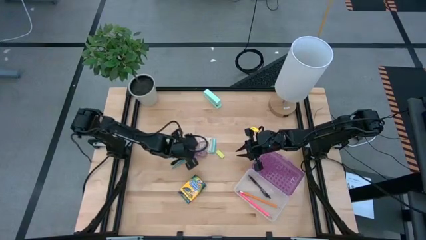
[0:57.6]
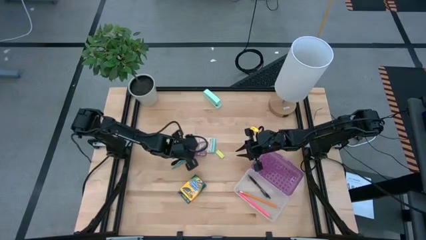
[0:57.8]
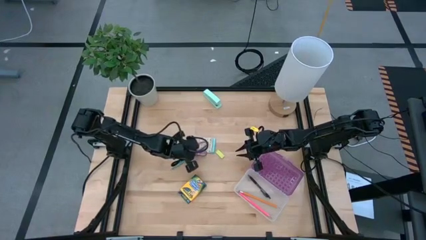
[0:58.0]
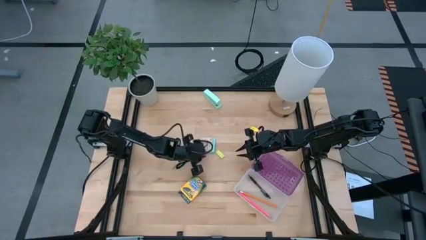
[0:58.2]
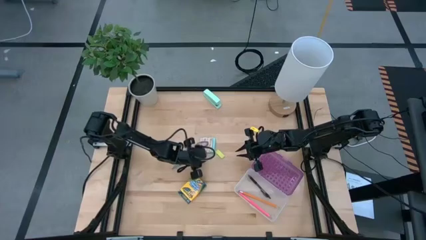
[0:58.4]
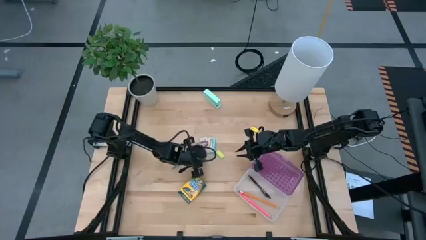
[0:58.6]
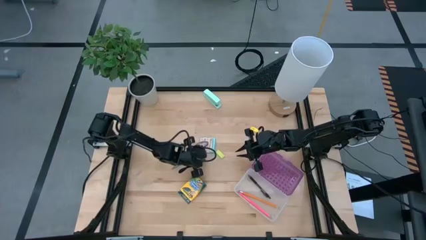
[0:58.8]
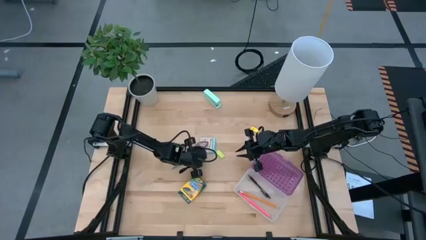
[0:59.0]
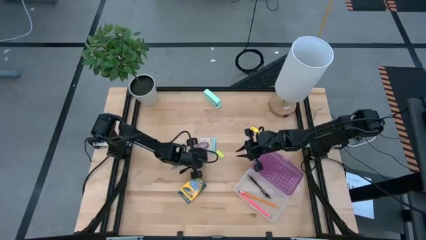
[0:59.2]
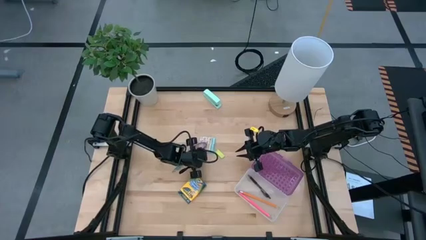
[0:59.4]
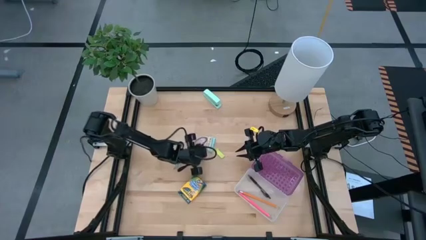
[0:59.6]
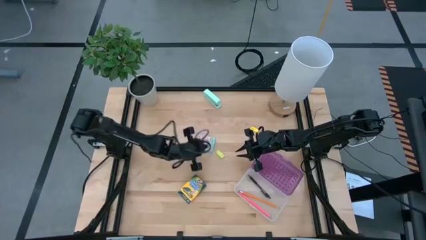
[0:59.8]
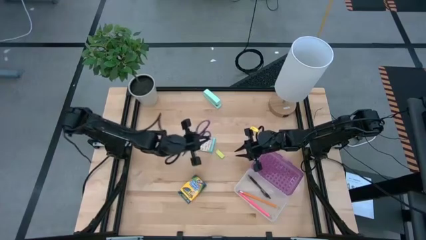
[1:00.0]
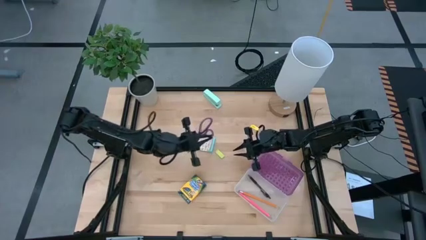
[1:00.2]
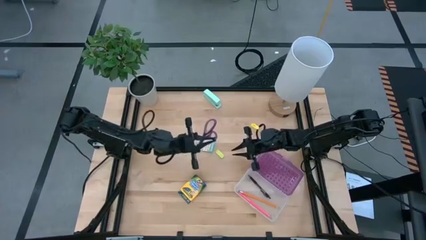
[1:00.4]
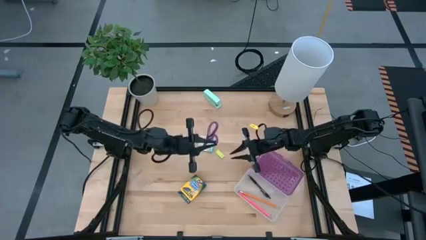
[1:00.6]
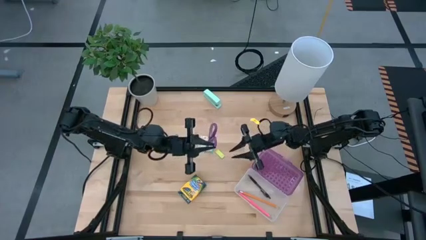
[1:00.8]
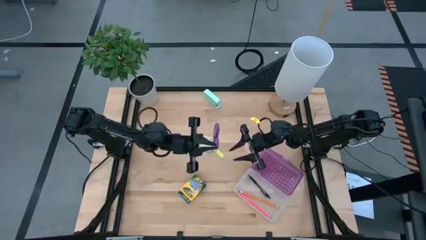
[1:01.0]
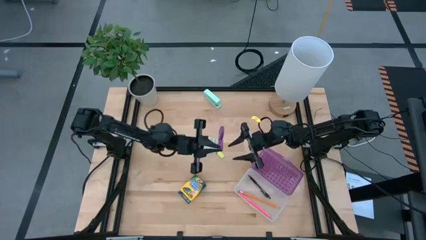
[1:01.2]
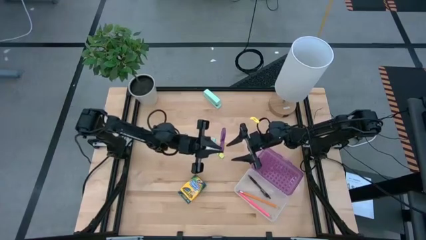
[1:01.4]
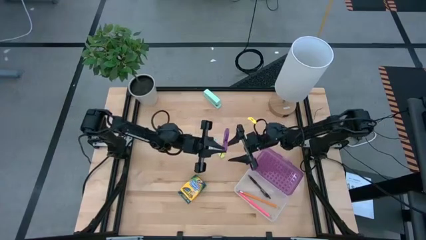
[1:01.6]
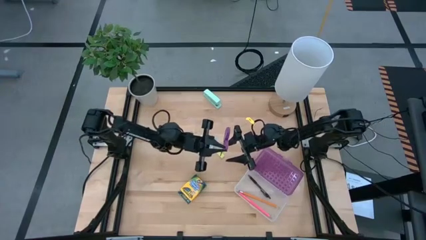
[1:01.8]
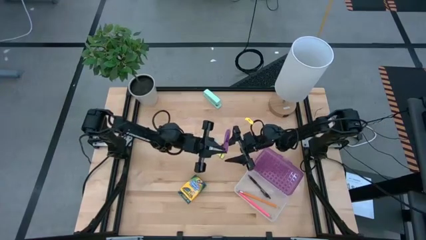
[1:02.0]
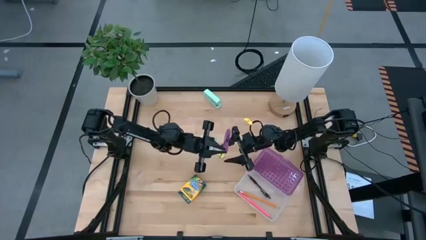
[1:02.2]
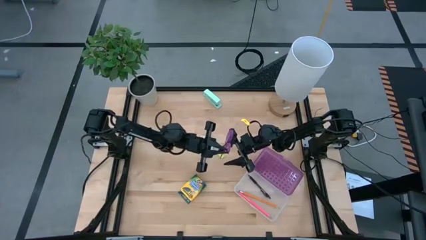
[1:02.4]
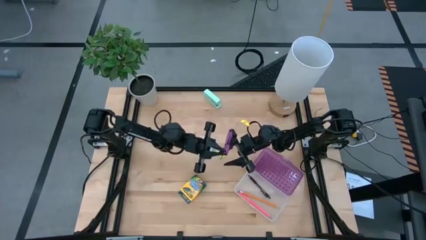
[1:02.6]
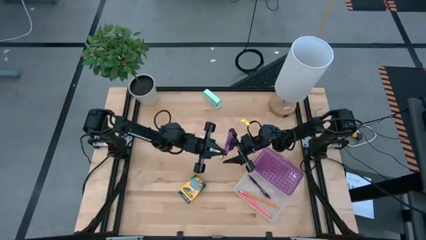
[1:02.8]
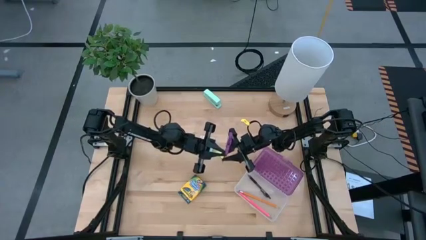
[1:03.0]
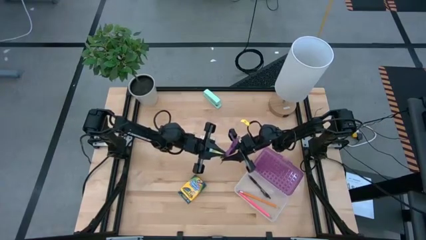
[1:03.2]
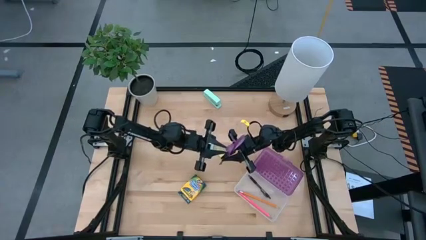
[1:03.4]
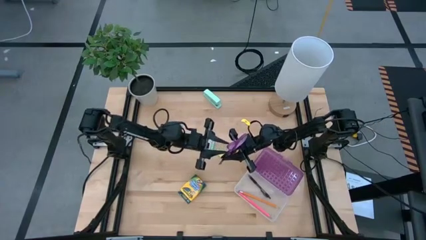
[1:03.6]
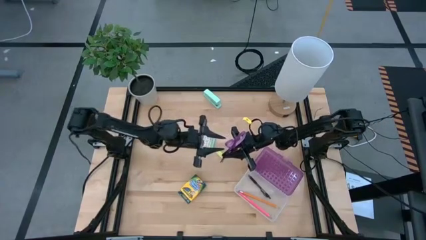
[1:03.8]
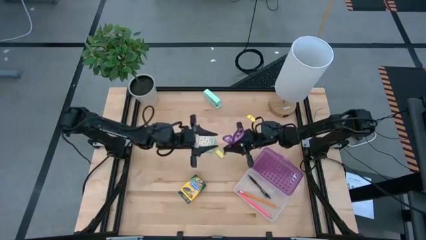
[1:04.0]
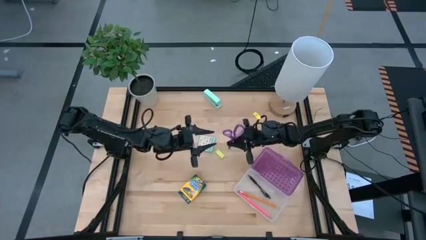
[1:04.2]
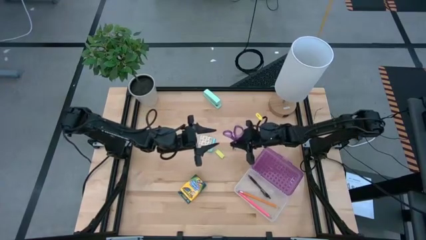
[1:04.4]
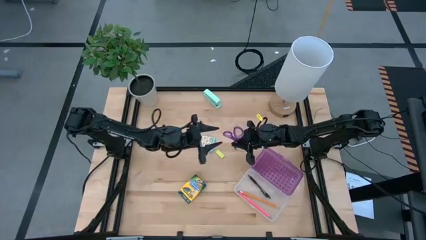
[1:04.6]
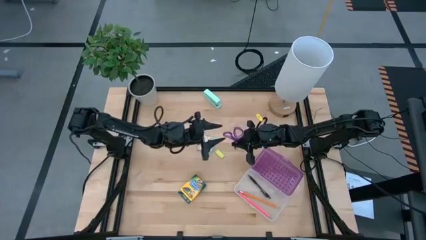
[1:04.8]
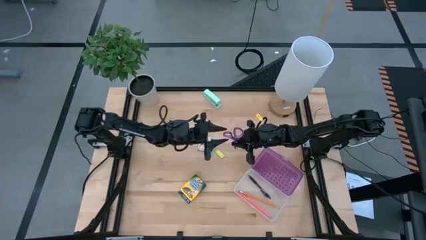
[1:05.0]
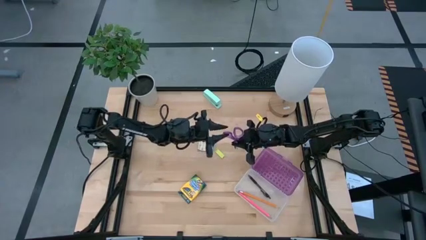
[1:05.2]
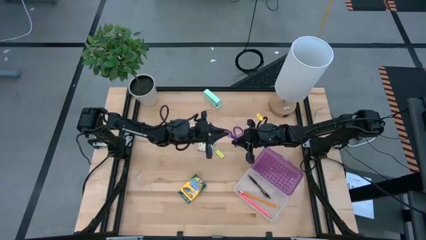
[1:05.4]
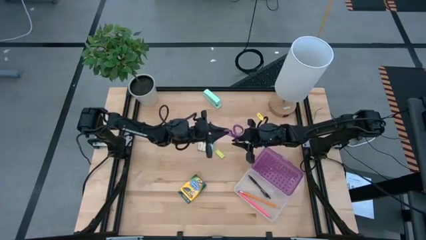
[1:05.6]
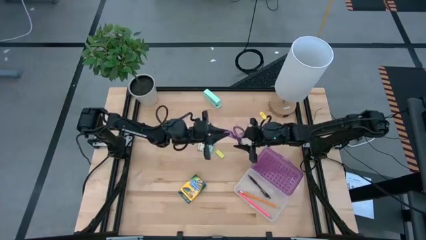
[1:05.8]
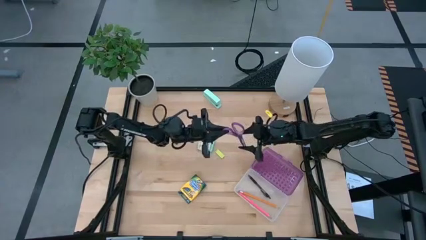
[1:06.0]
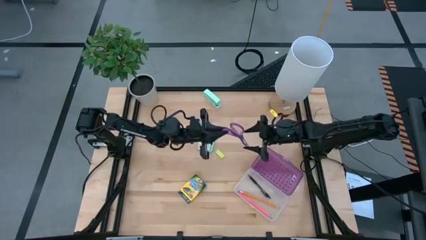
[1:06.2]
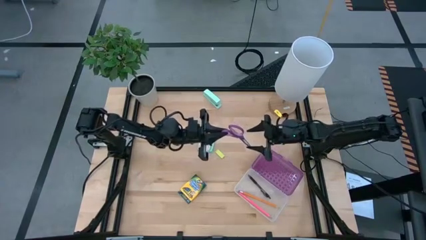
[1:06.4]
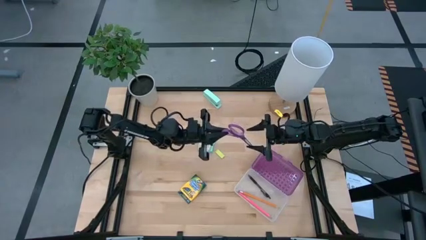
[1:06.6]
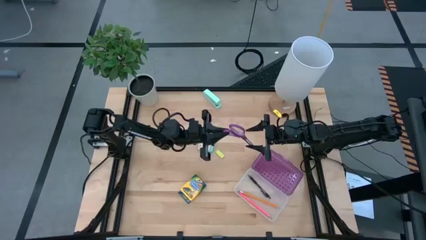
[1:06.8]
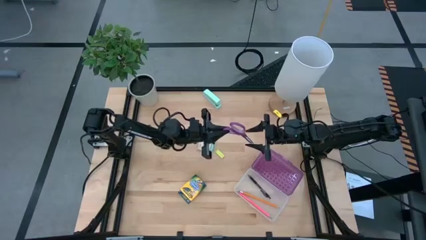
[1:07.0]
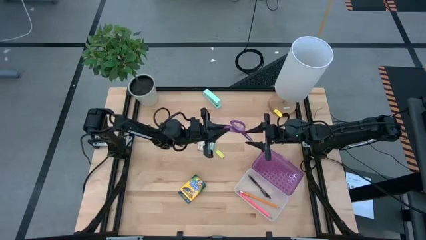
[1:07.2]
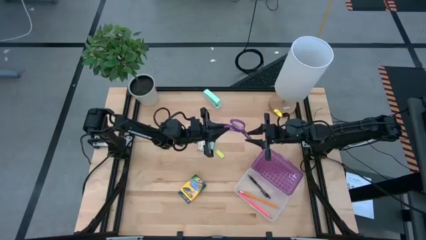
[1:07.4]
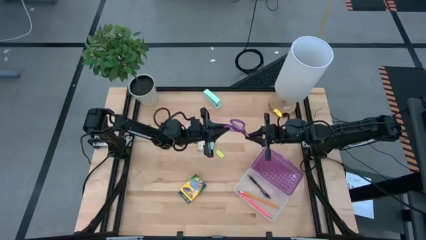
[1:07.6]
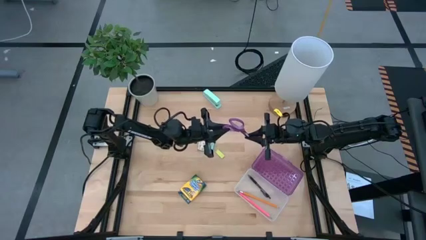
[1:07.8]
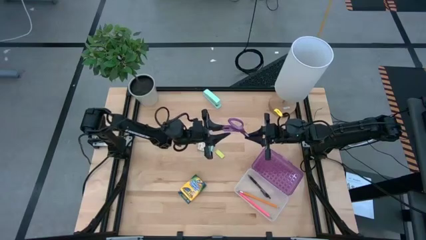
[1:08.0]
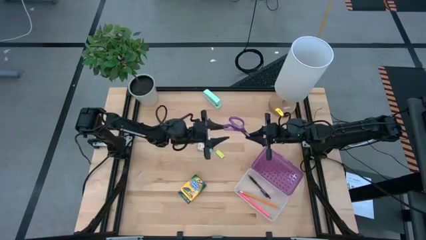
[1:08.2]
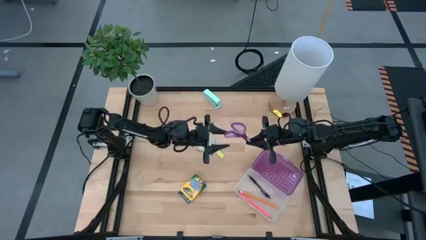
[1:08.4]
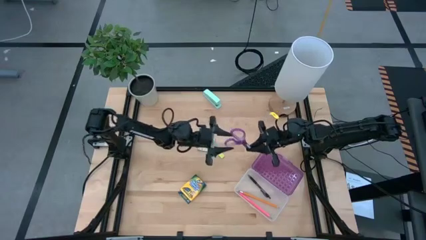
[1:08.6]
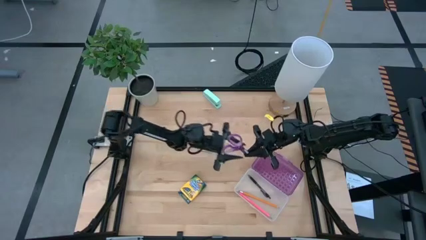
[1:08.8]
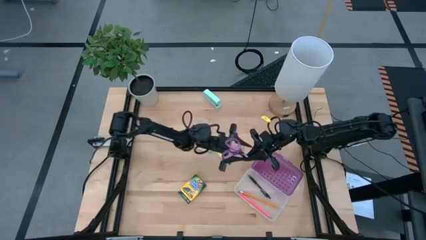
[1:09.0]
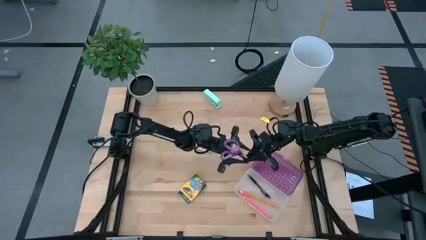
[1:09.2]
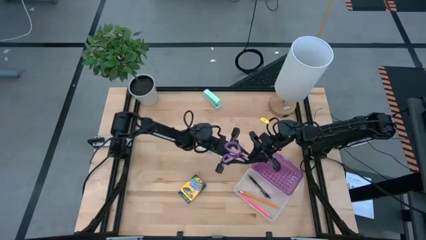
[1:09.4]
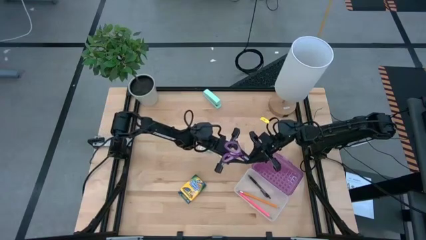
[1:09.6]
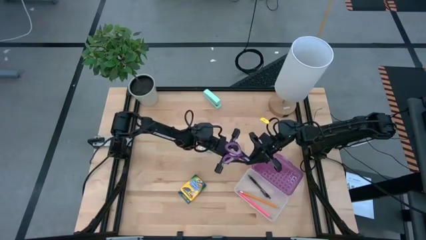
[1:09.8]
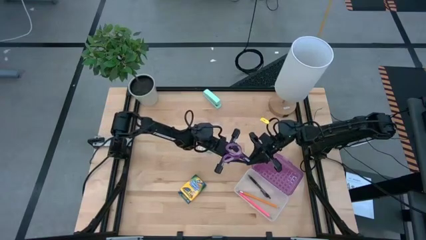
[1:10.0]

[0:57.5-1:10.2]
Task: Pack school essentials
Put the violet scissors into the violet supply box
